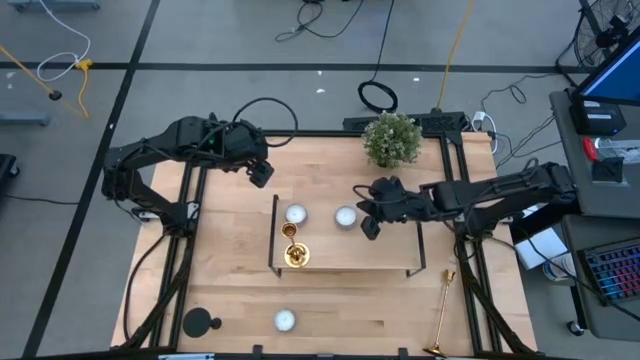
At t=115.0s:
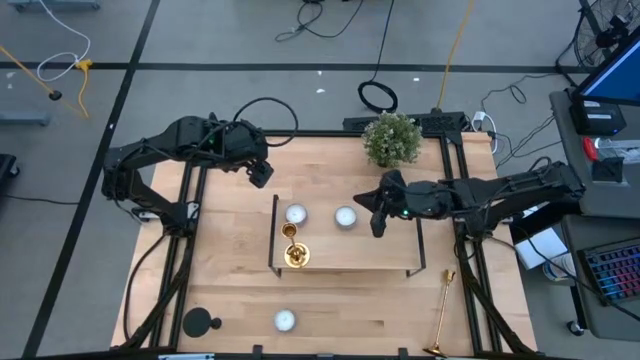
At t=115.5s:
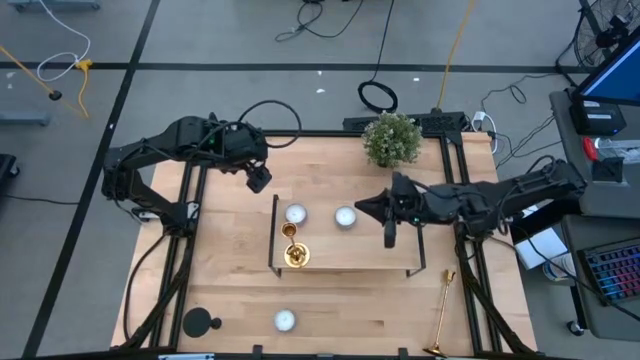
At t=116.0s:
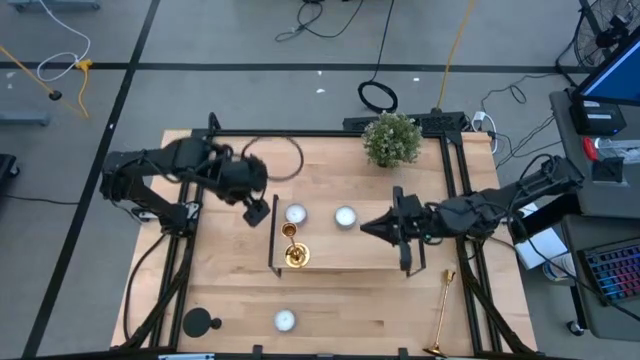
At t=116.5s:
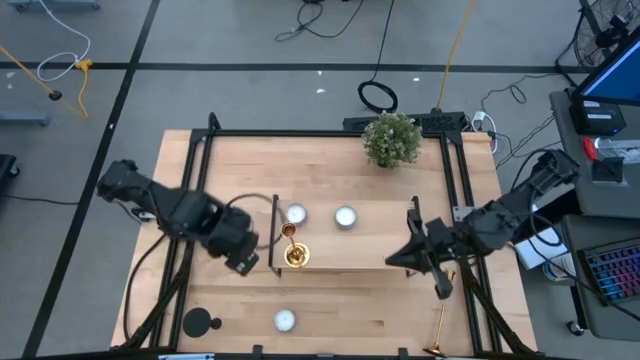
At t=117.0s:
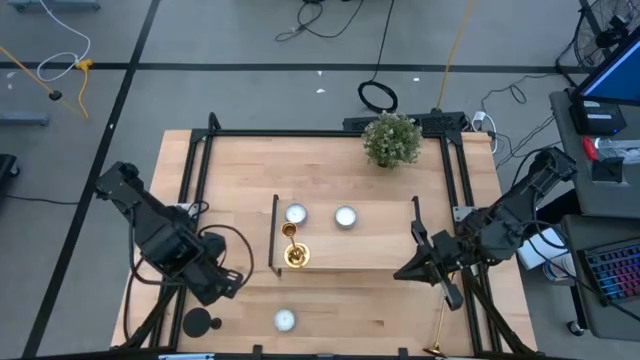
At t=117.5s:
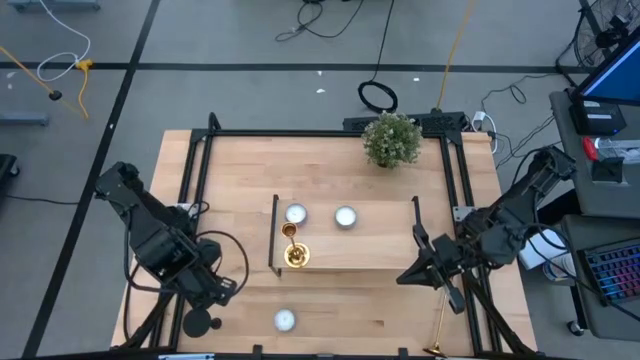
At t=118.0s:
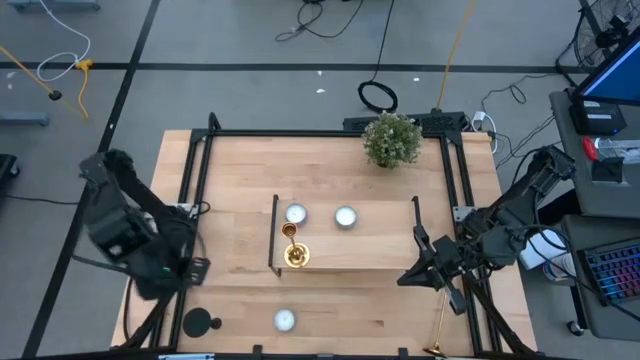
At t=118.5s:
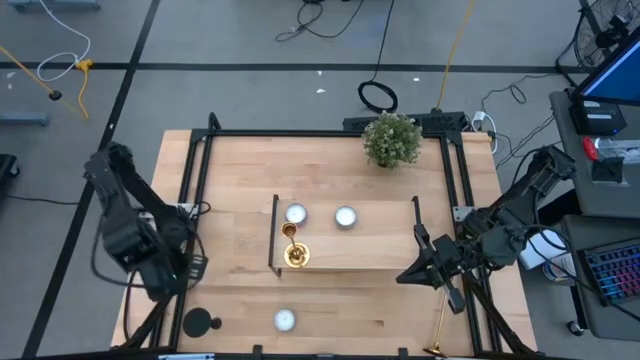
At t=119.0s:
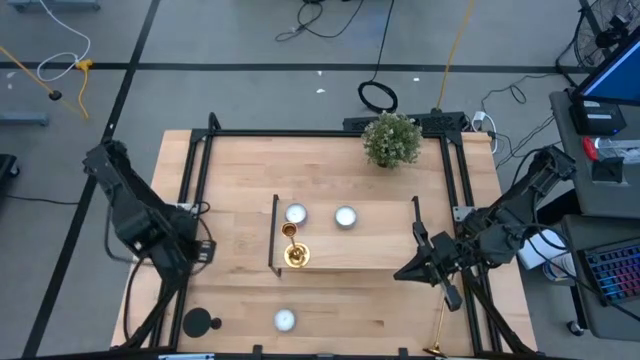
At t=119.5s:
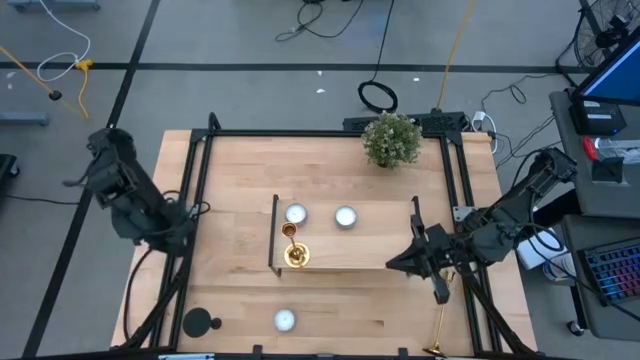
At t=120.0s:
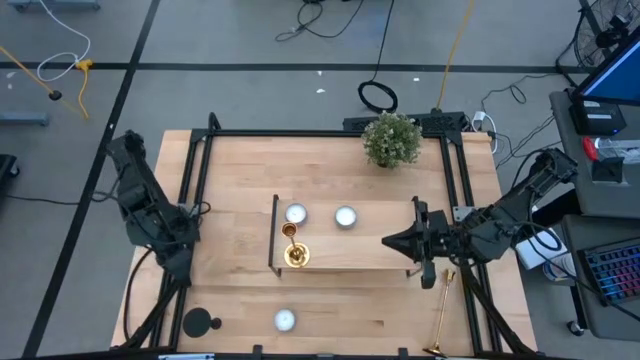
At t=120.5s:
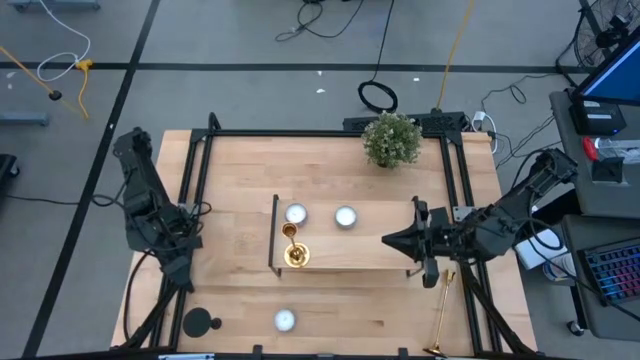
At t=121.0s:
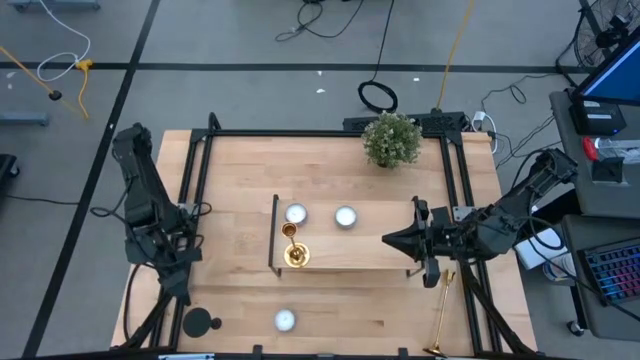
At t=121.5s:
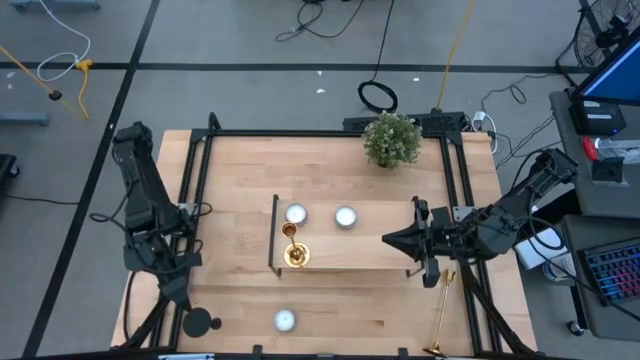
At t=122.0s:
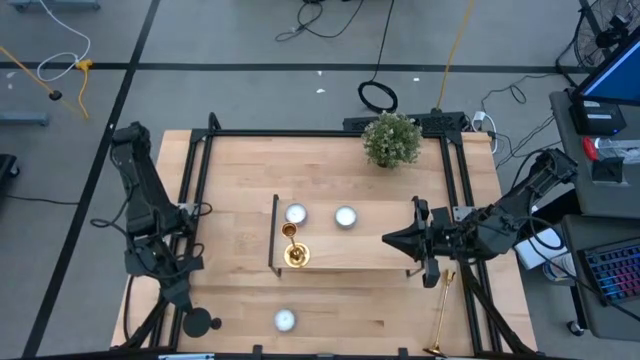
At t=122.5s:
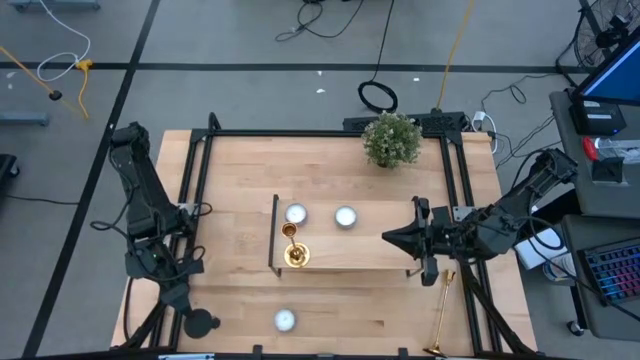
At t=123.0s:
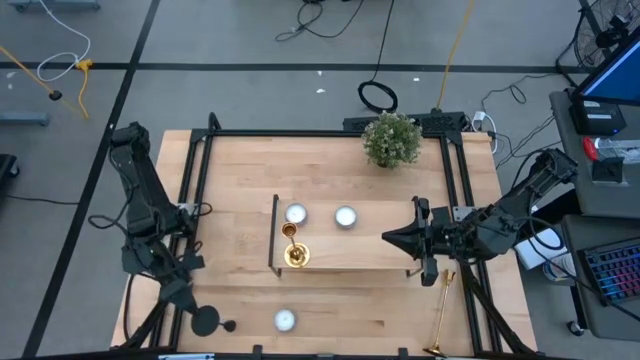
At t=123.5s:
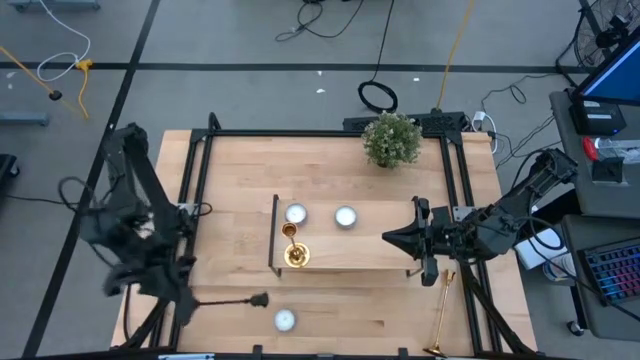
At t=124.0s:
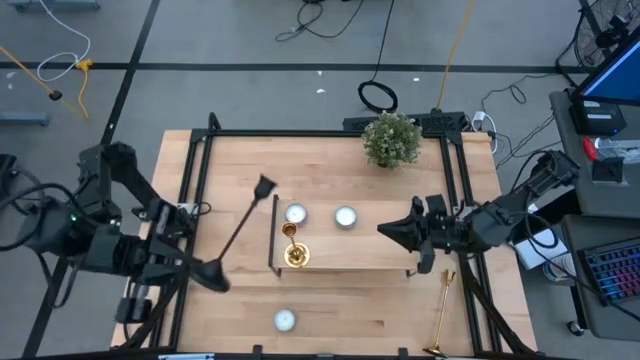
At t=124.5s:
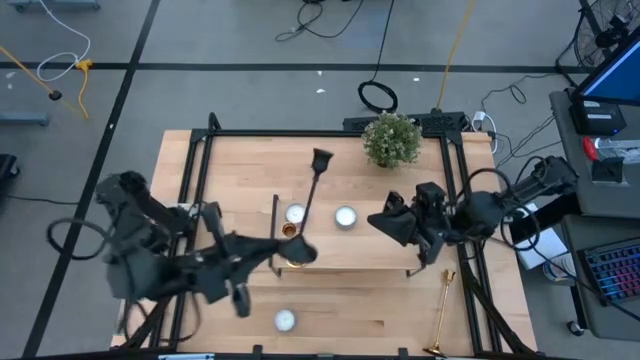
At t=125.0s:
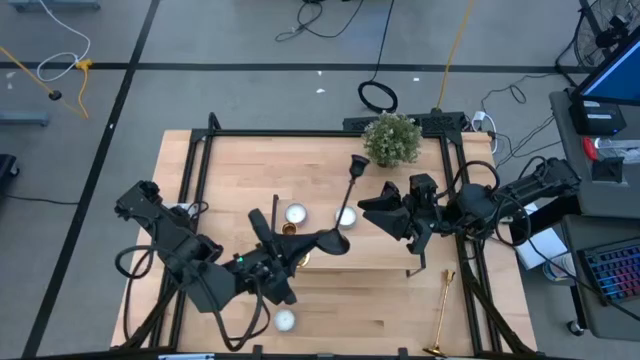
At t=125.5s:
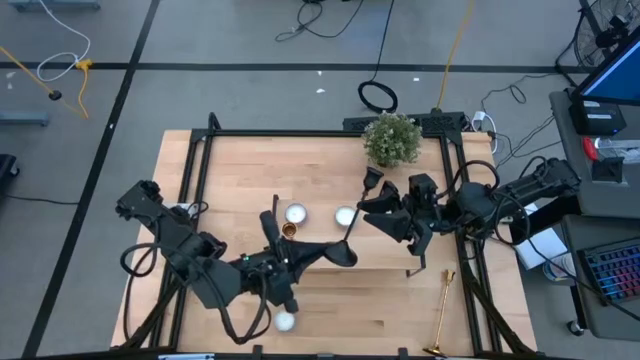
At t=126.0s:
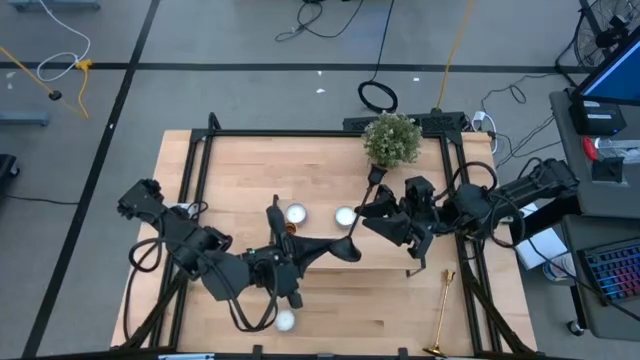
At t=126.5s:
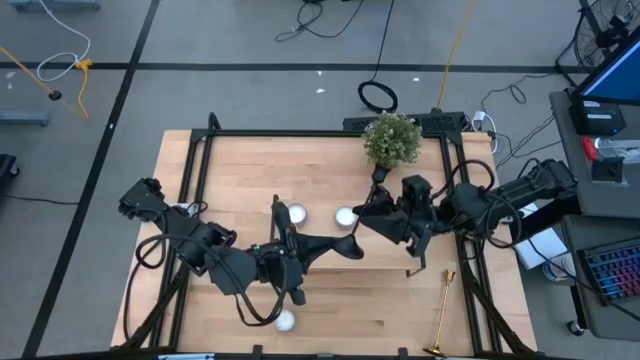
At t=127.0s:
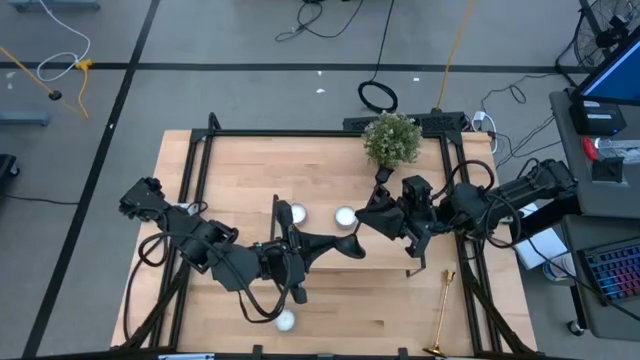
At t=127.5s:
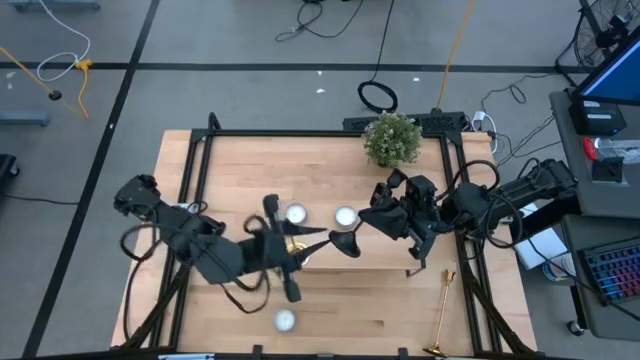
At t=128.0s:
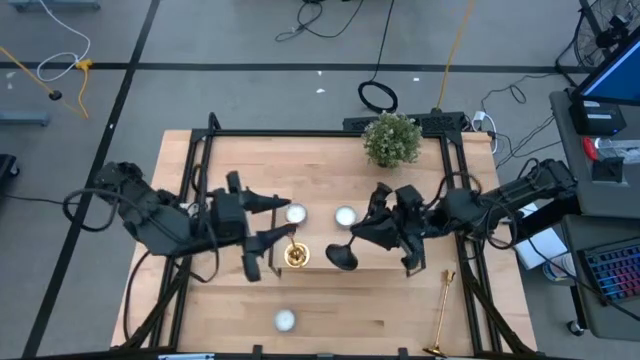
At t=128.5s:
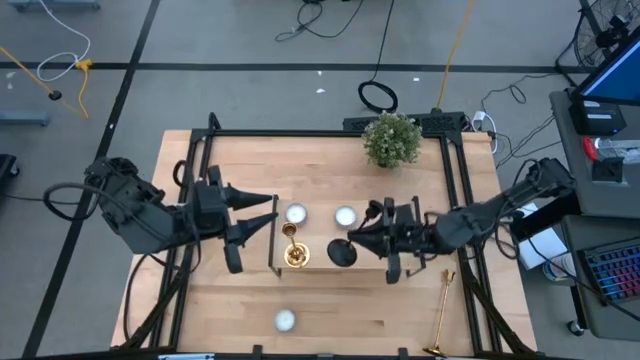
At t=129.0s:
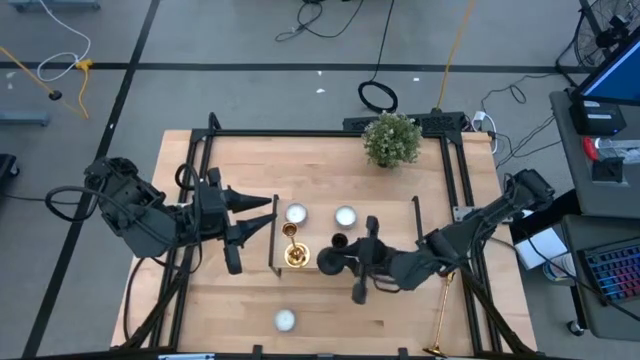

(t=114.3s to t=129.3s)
Task: Pick & Place candle stick holders
Put the black candleholder on the shelf

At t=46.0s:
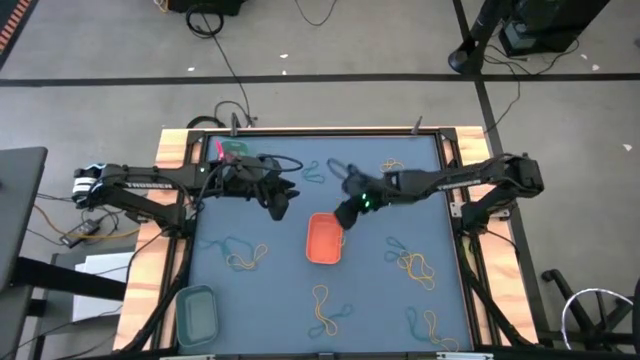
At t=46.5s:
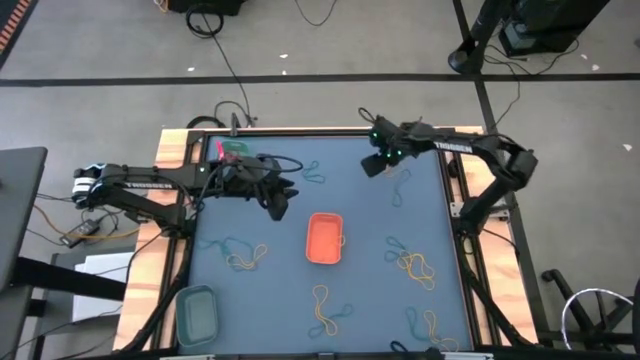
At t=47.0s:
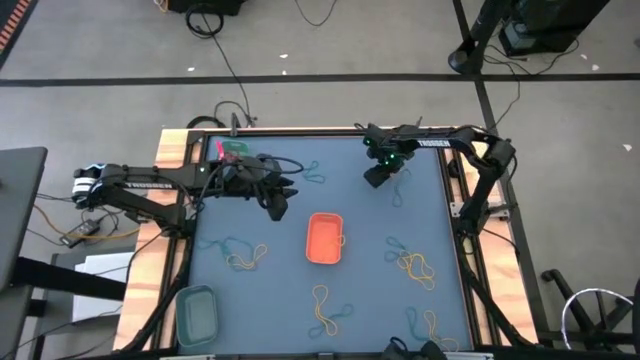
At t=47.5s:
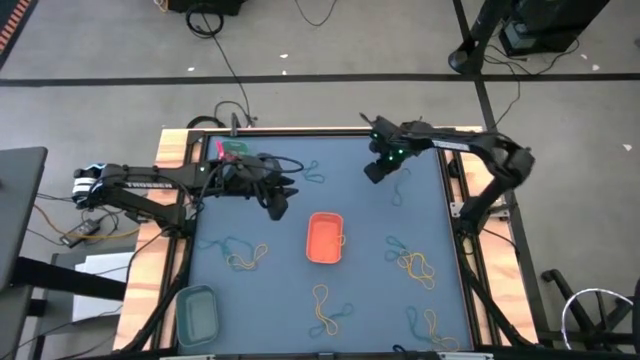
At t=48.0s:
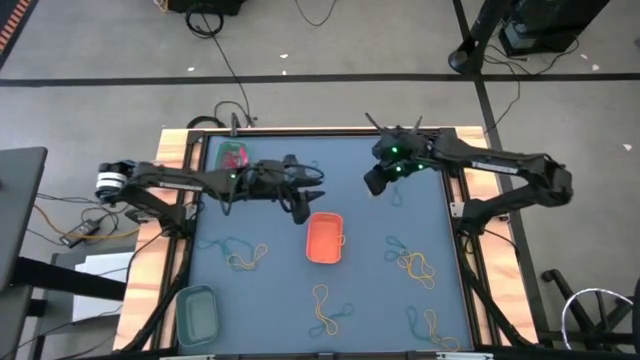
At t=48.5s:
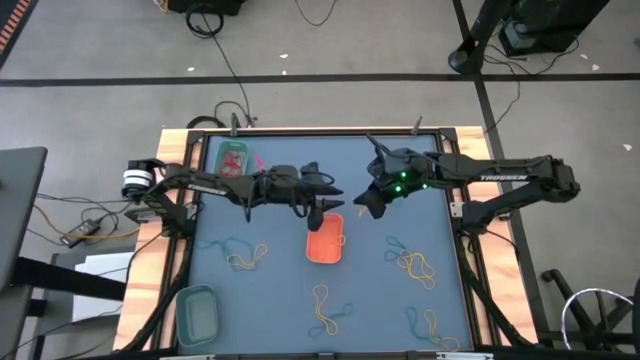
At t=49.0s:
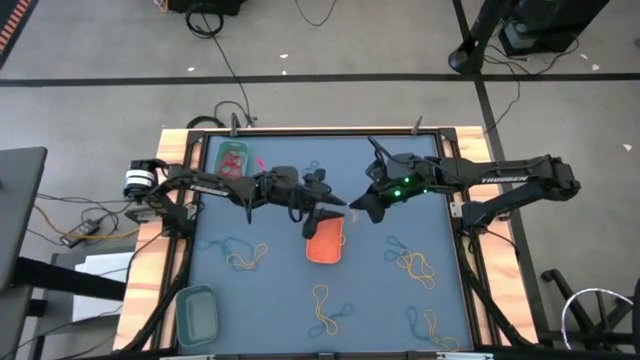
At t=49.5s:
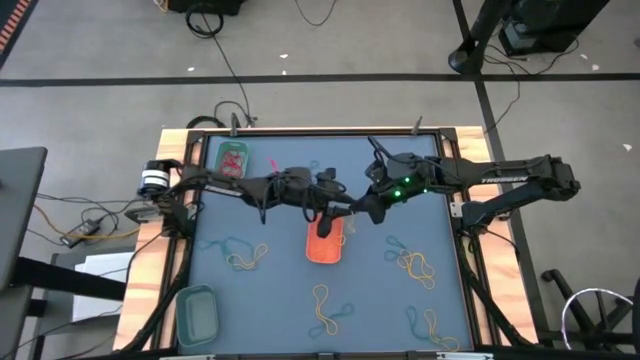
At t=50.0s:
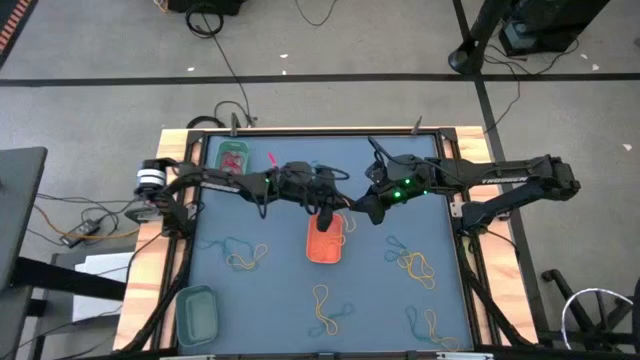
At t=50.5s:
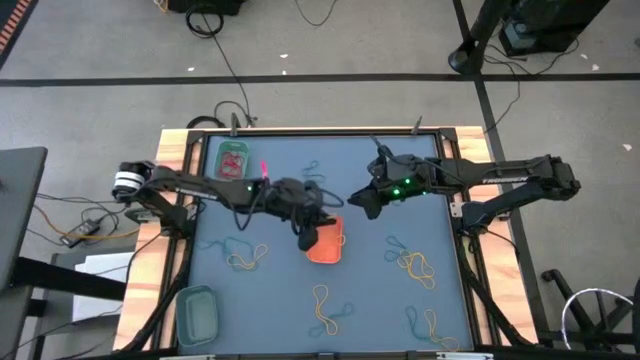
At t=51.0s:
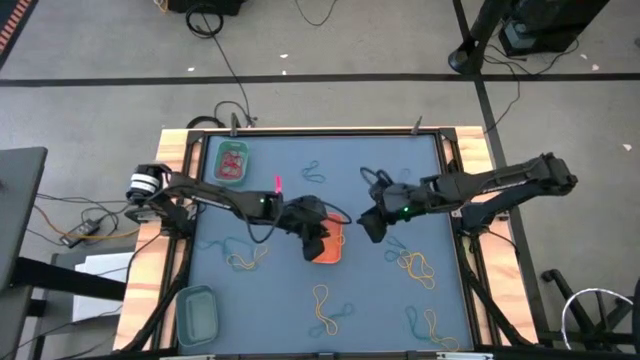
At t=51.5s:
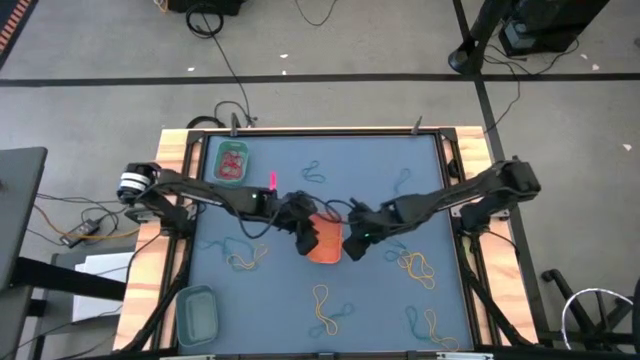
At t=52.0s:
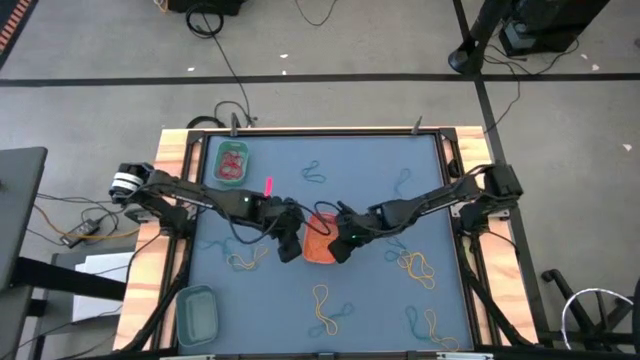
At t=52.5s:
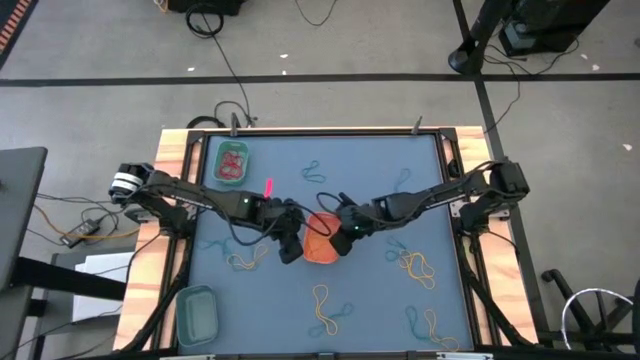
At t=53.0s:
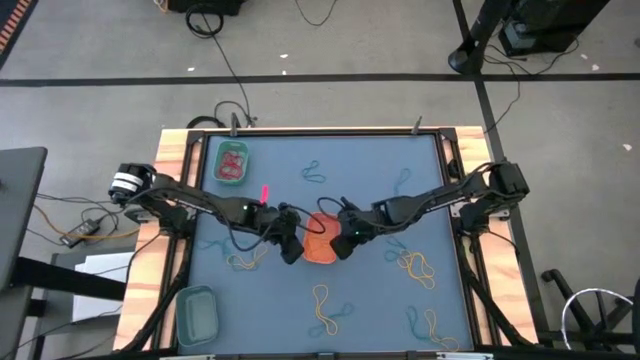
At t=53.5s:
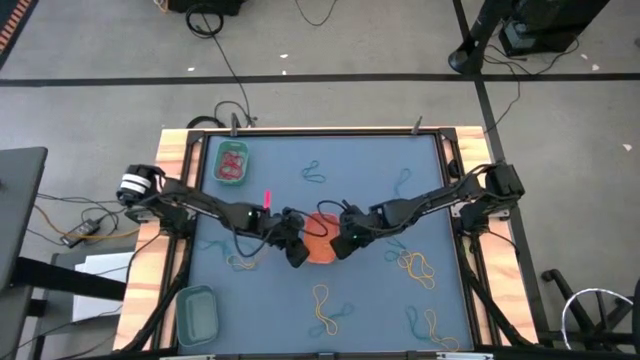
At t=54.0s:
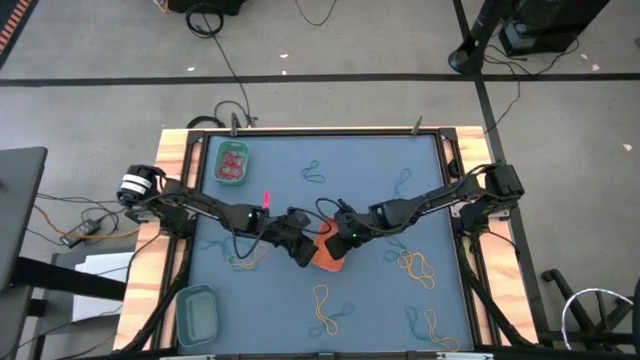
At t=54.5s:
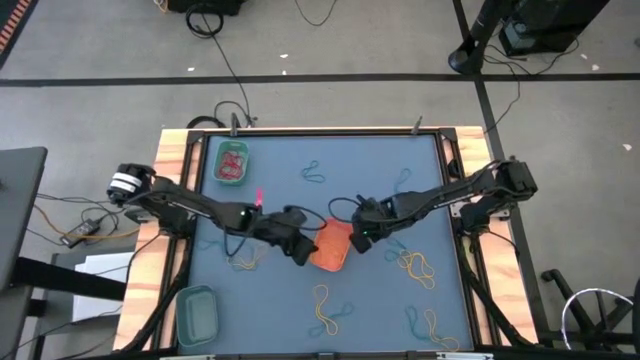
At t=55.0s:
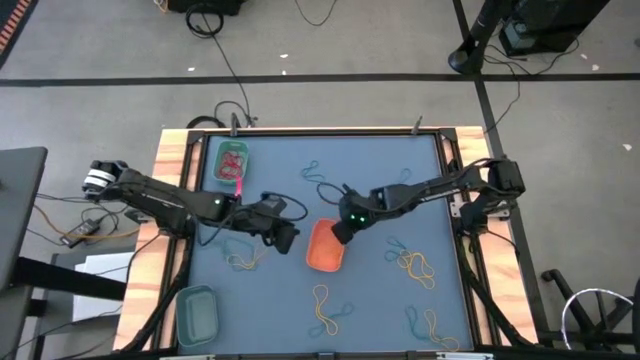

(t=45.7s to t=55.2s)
Task: Sort rubber bands into baskets
Put the top yellow rubber band into the orange bin
